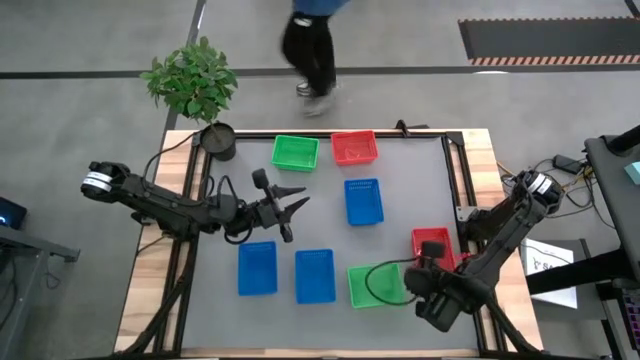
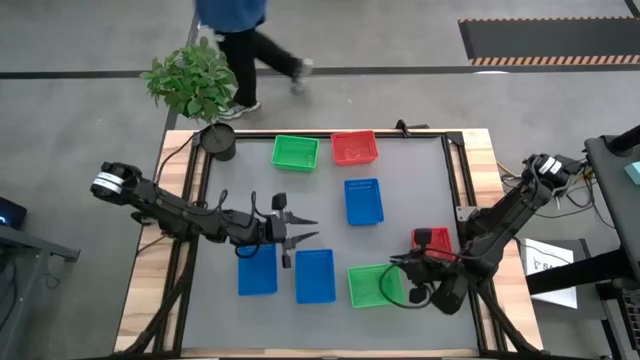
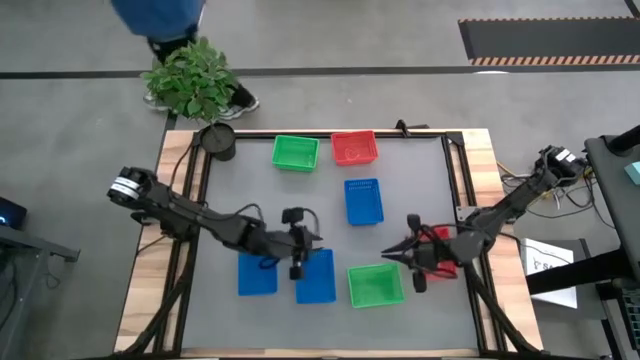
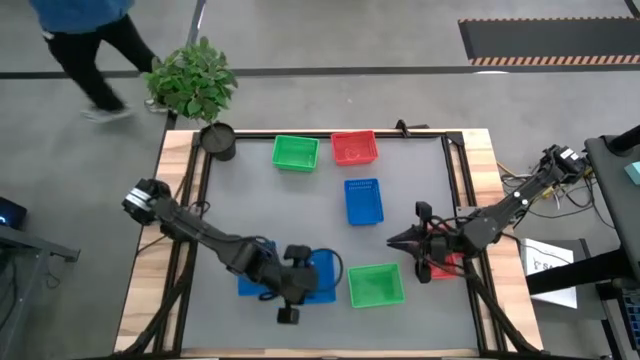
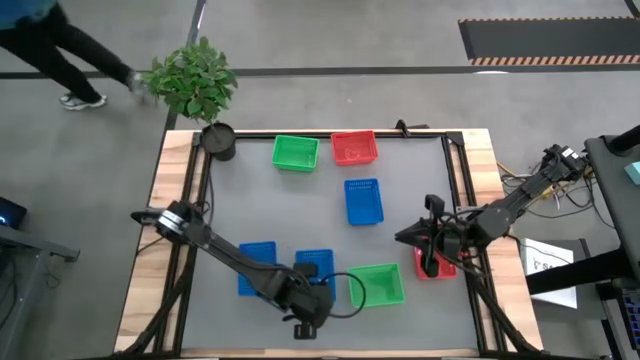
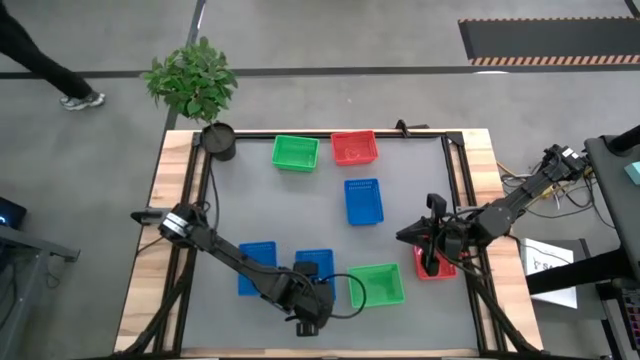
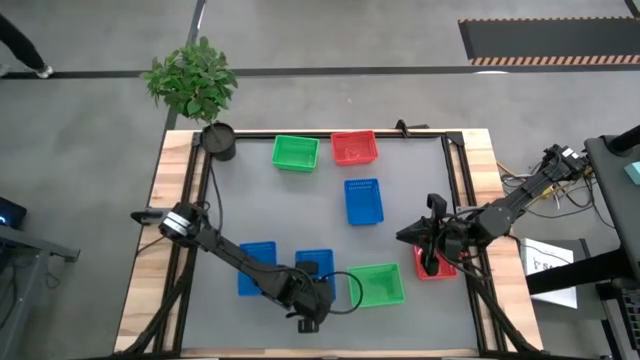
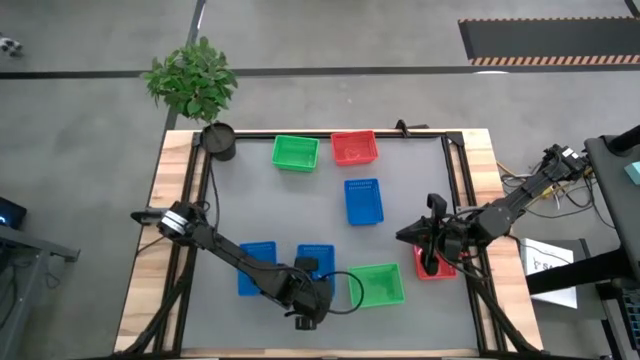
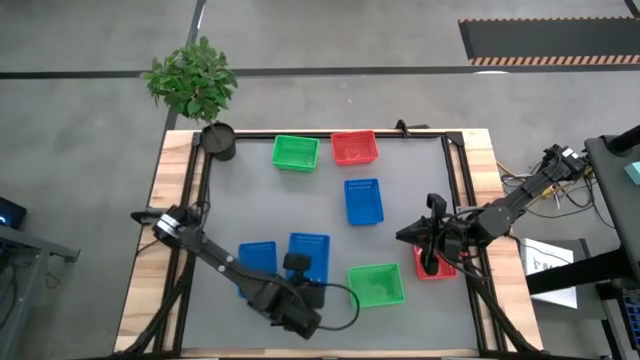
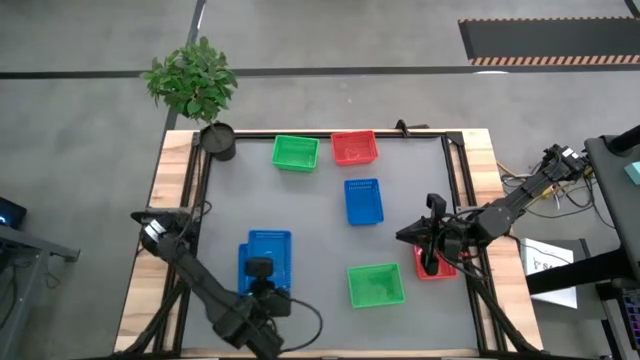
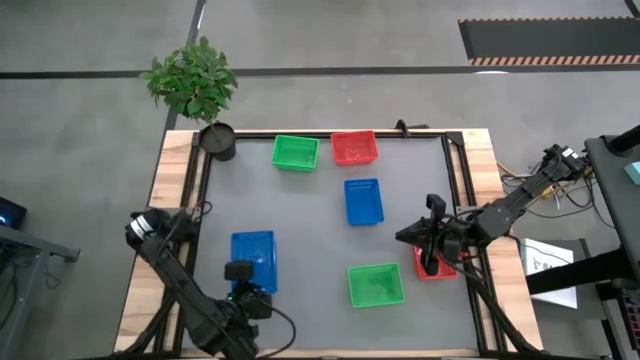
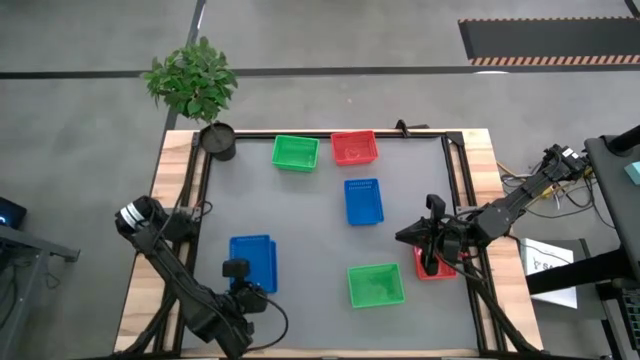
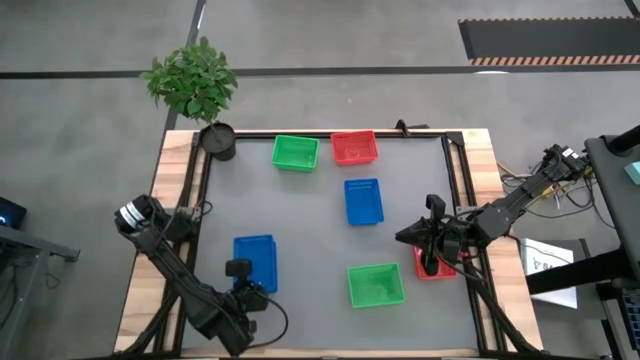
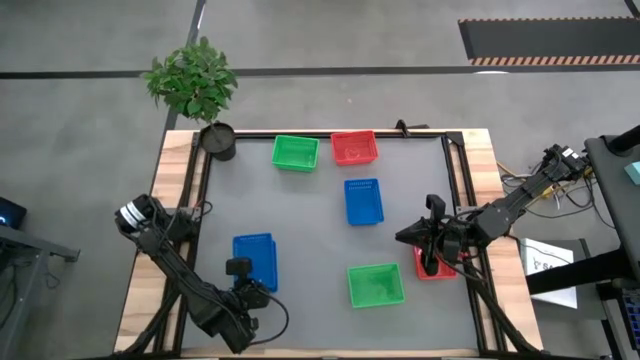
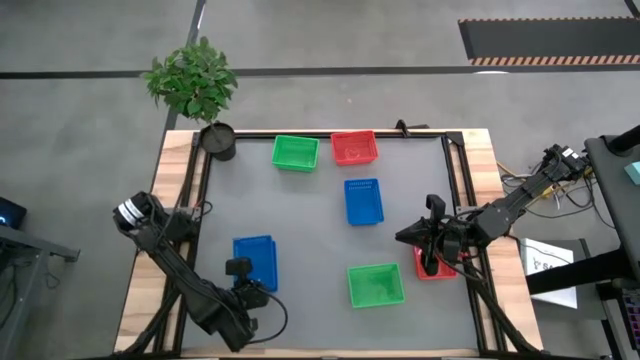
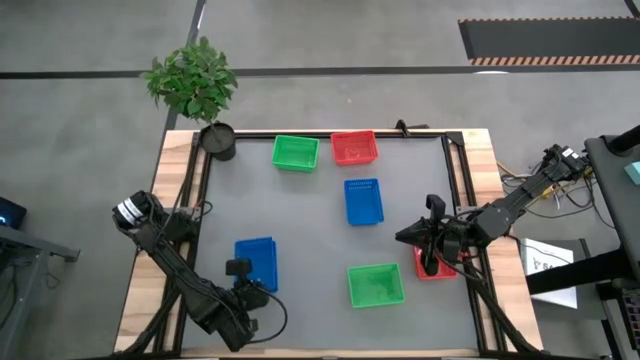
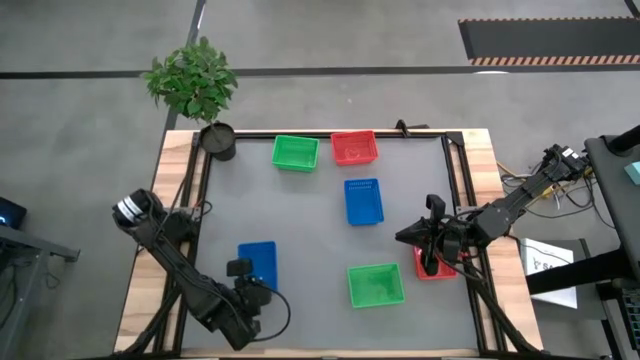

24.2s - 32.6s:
Stack the bottom right blue bin on the bottom left blue bin

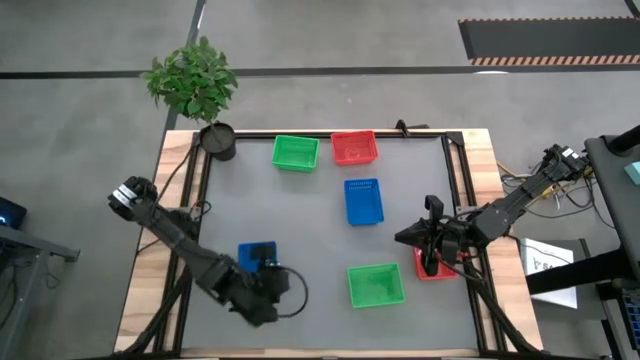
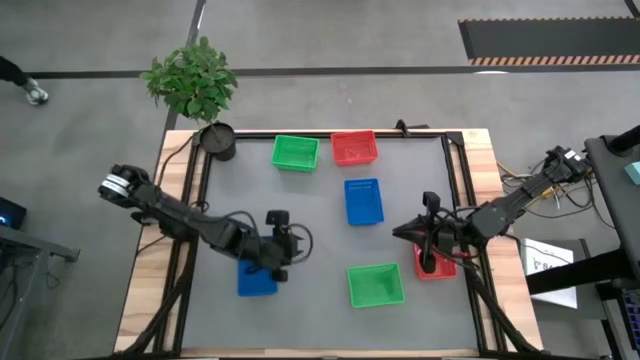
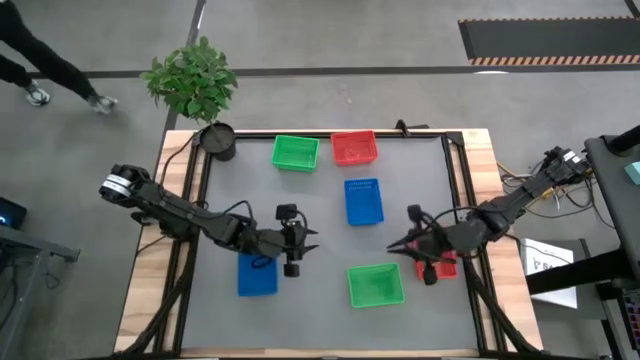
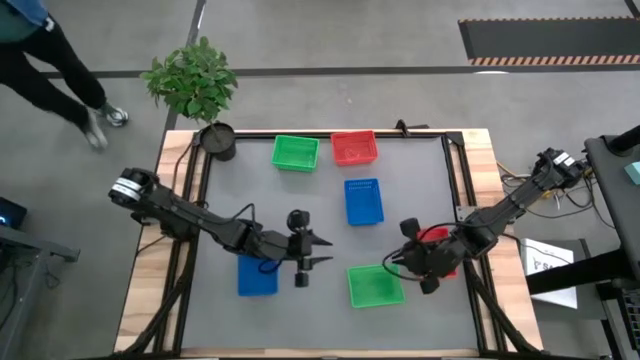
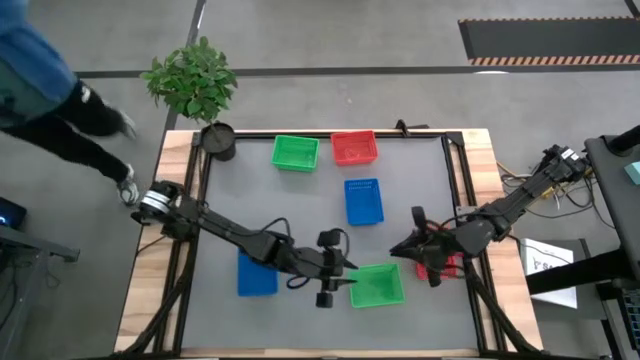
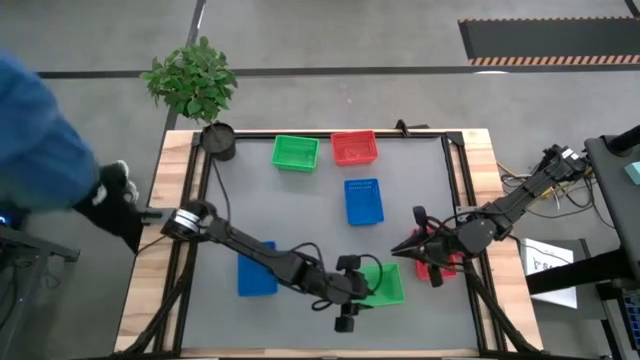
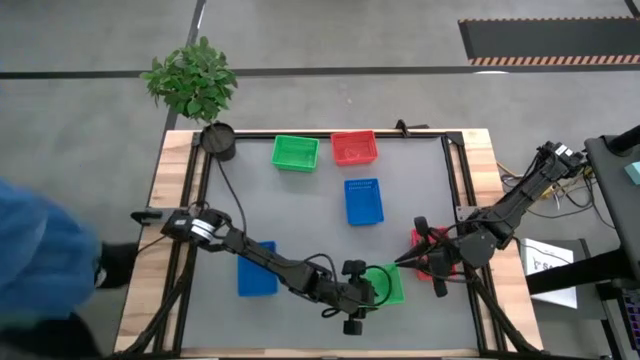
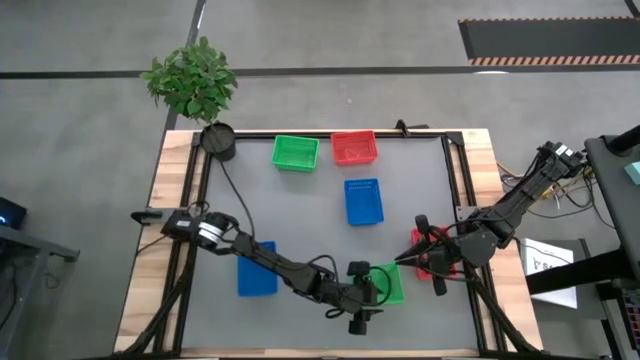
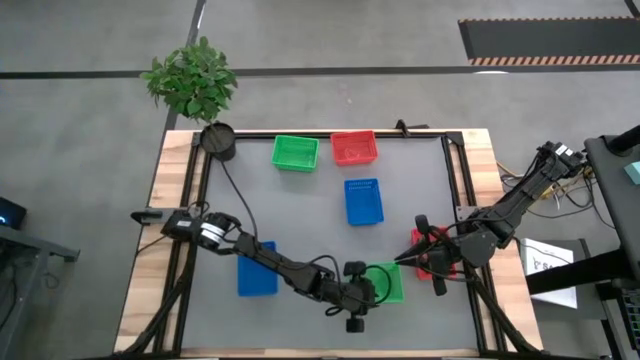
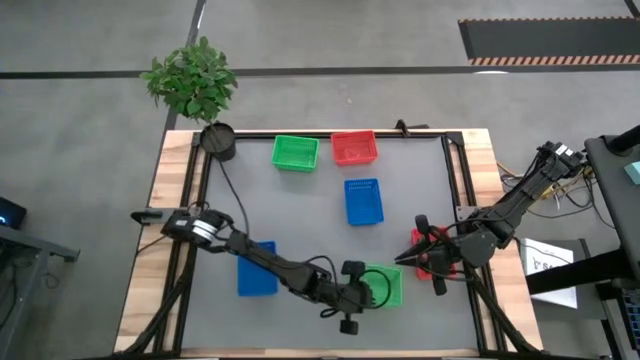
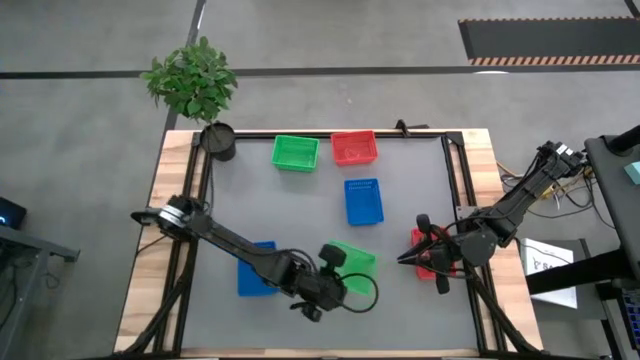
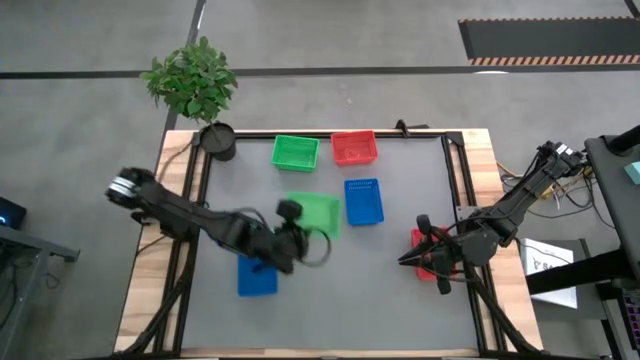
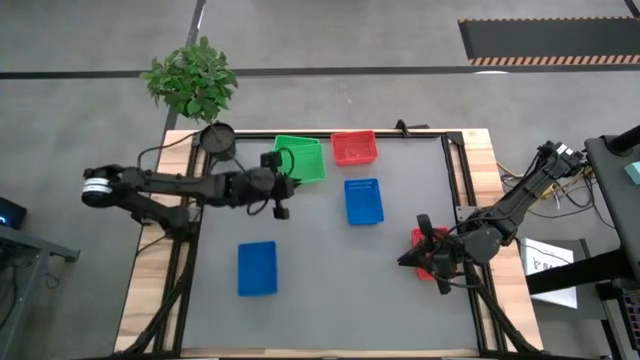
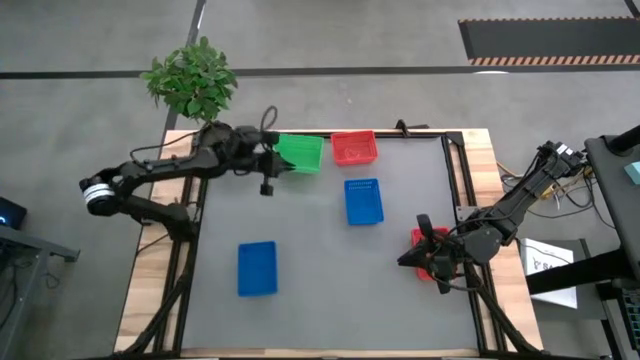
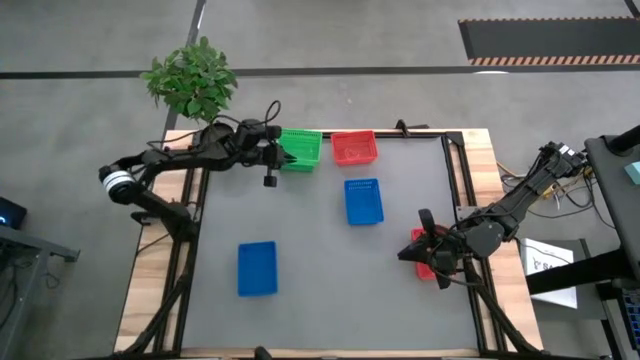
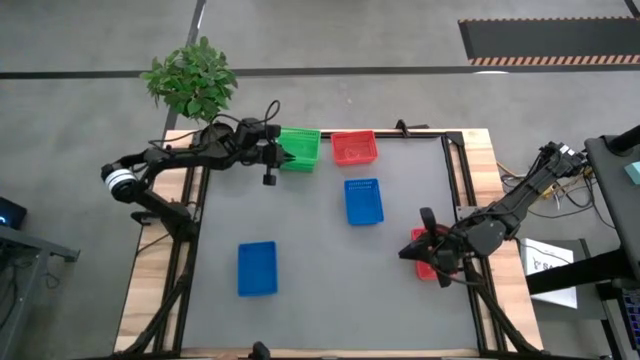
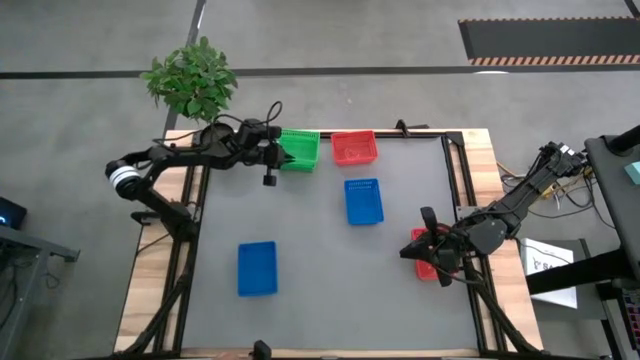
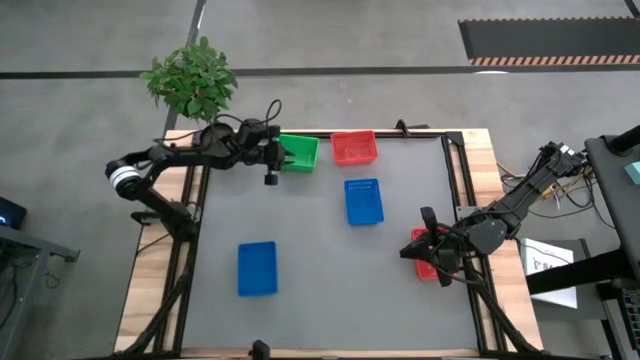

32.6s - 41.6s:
Stack the bottom green bin on the green bin
